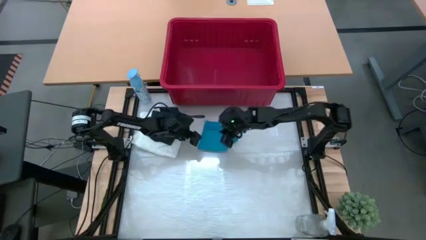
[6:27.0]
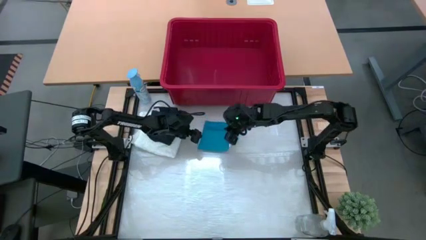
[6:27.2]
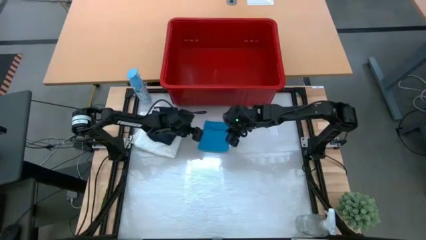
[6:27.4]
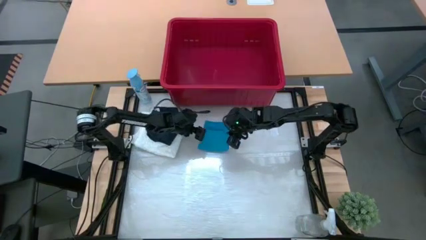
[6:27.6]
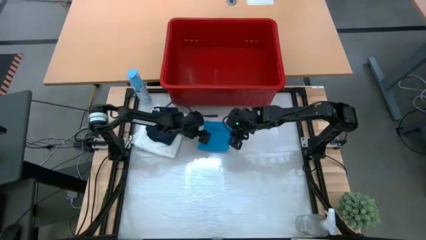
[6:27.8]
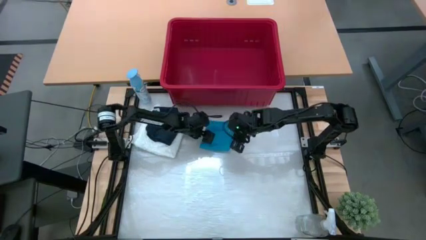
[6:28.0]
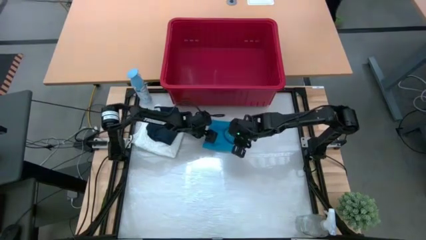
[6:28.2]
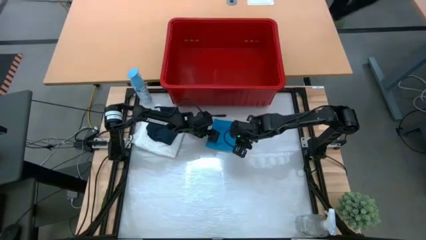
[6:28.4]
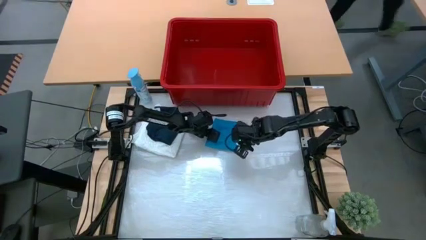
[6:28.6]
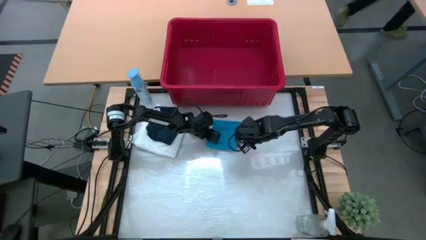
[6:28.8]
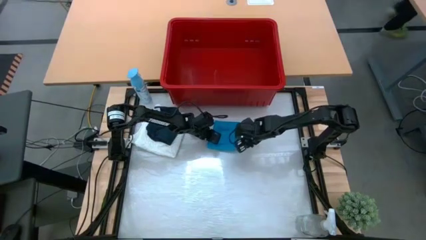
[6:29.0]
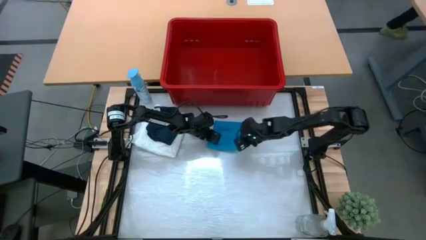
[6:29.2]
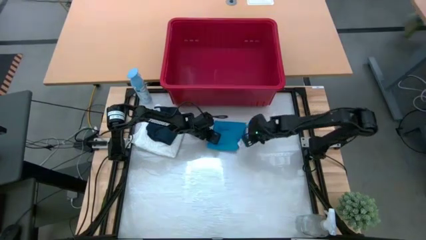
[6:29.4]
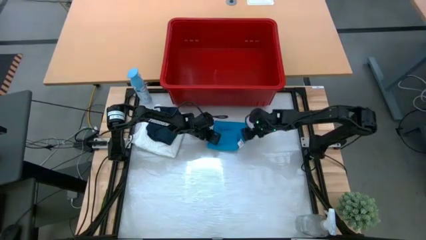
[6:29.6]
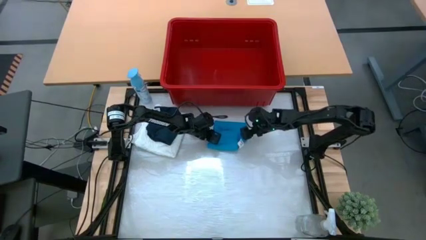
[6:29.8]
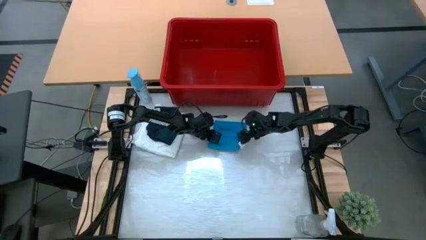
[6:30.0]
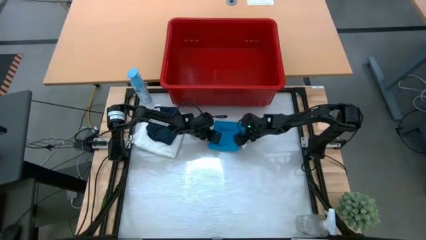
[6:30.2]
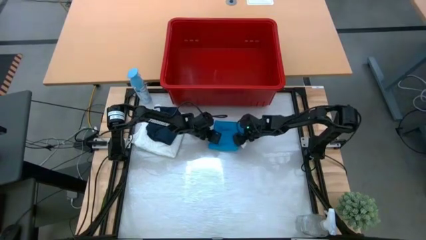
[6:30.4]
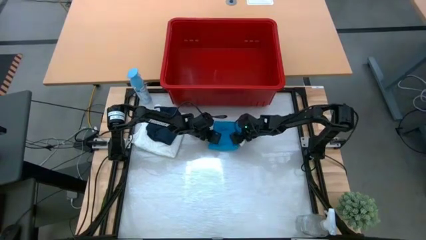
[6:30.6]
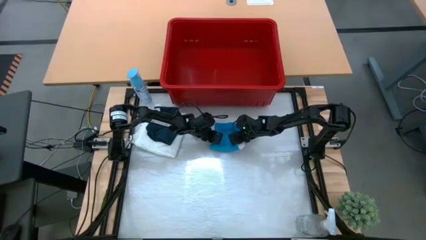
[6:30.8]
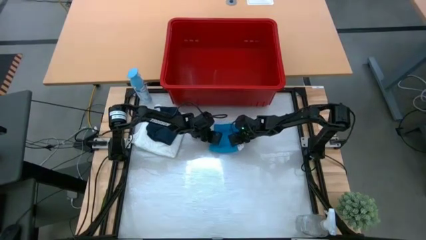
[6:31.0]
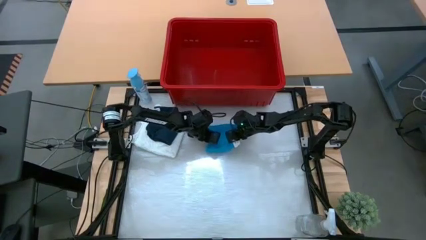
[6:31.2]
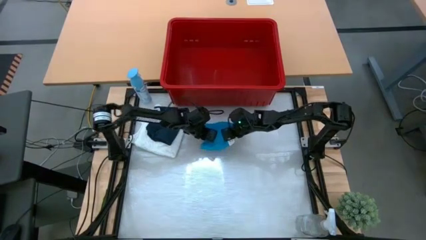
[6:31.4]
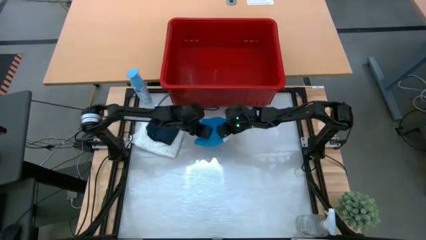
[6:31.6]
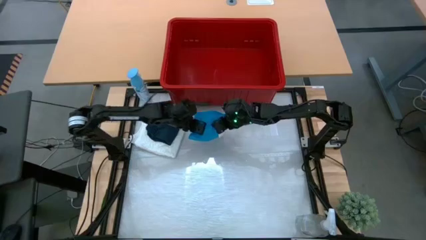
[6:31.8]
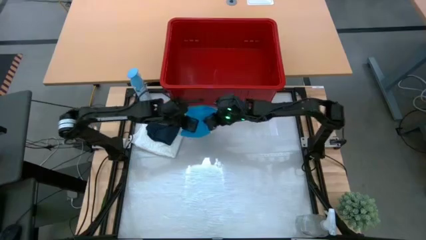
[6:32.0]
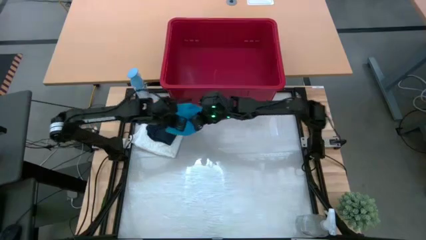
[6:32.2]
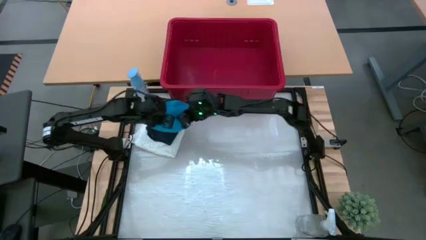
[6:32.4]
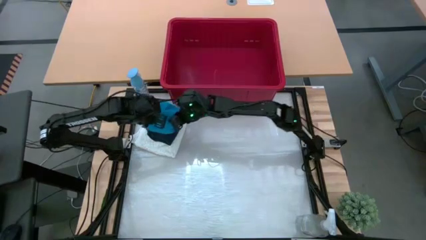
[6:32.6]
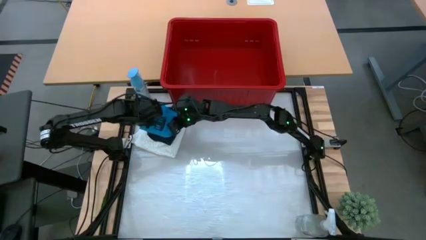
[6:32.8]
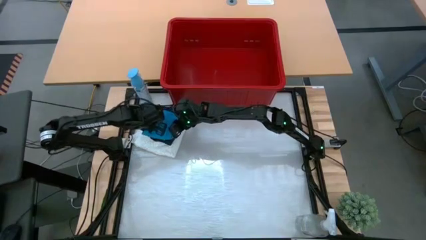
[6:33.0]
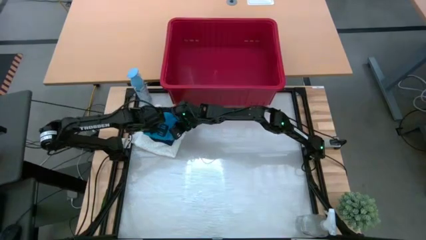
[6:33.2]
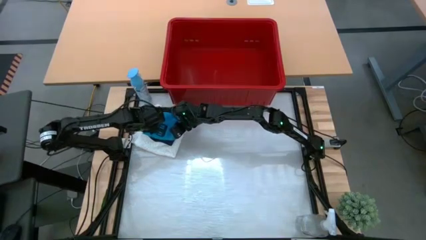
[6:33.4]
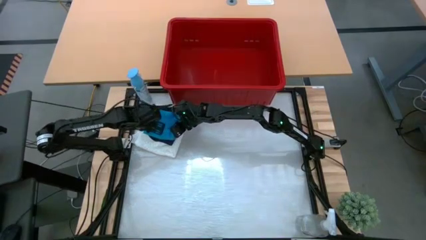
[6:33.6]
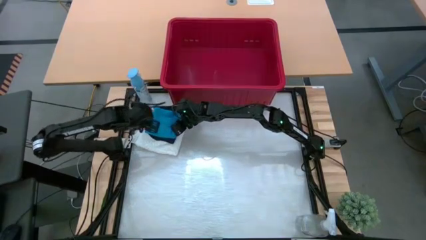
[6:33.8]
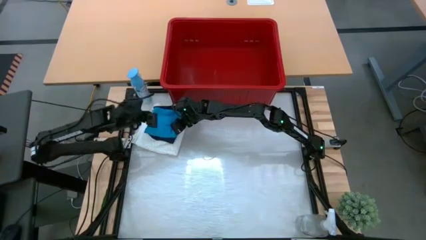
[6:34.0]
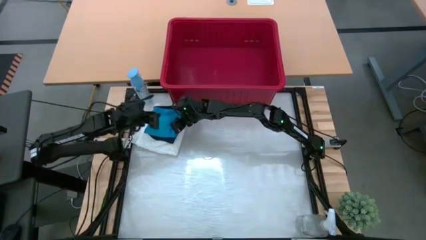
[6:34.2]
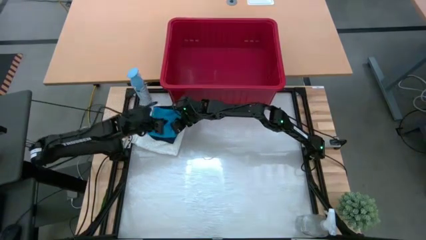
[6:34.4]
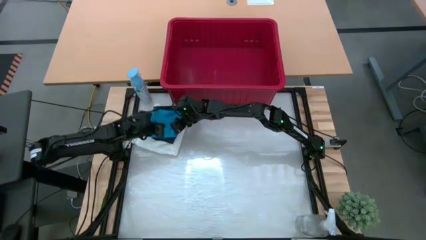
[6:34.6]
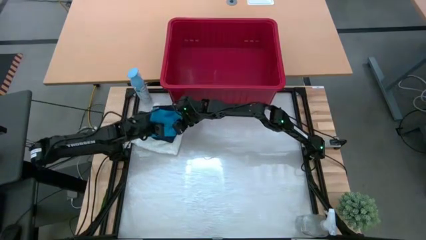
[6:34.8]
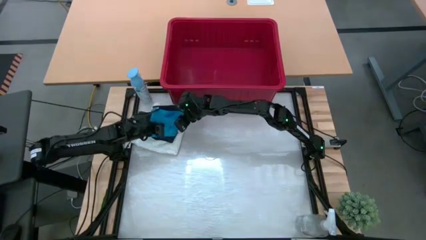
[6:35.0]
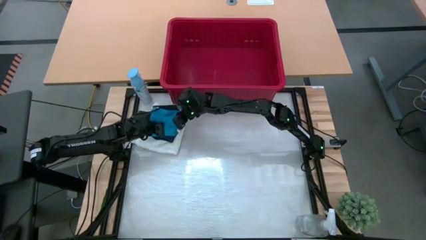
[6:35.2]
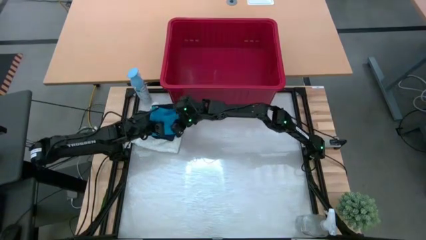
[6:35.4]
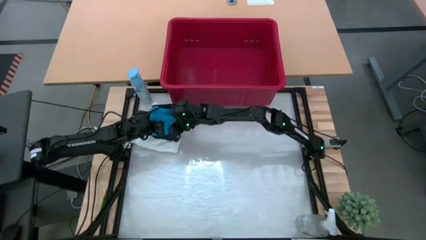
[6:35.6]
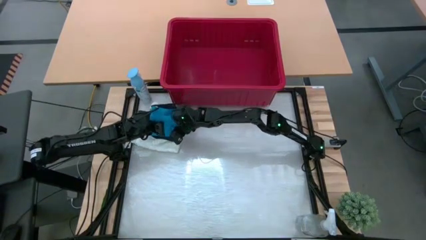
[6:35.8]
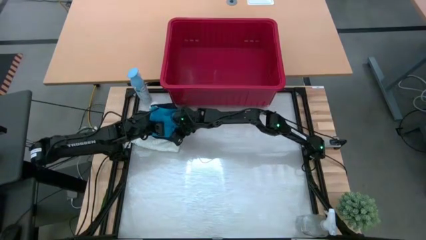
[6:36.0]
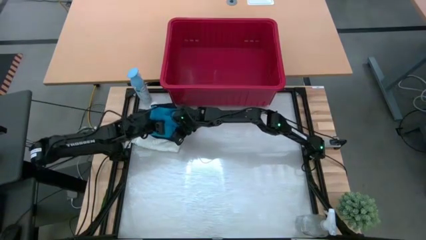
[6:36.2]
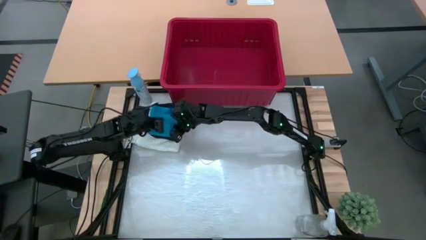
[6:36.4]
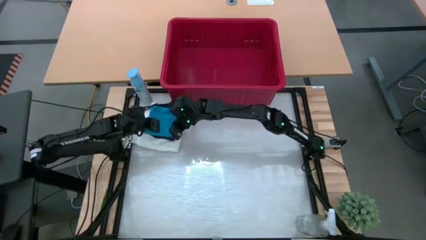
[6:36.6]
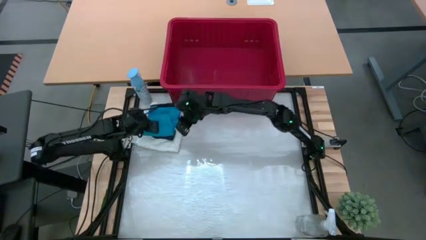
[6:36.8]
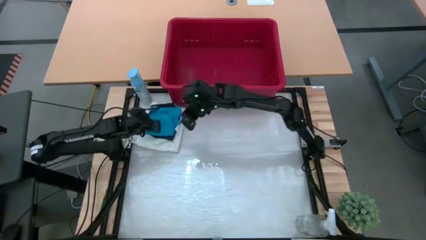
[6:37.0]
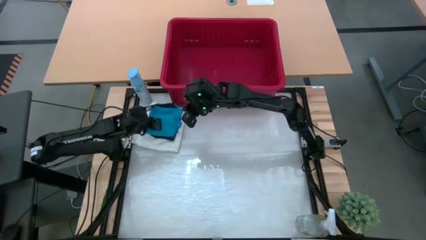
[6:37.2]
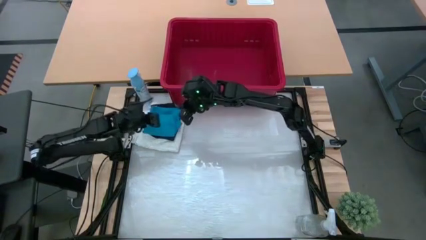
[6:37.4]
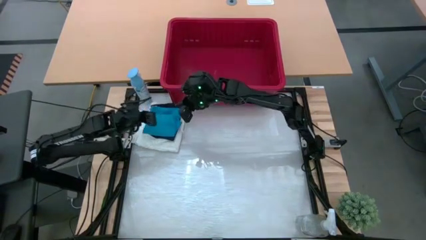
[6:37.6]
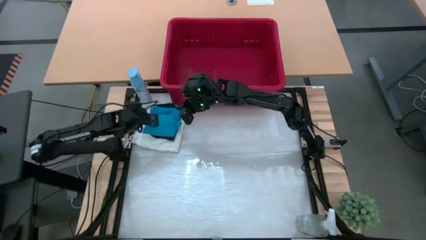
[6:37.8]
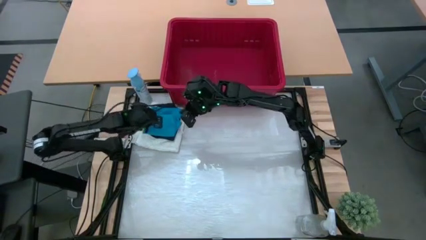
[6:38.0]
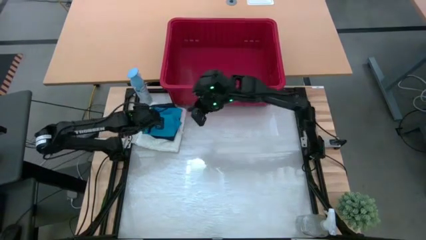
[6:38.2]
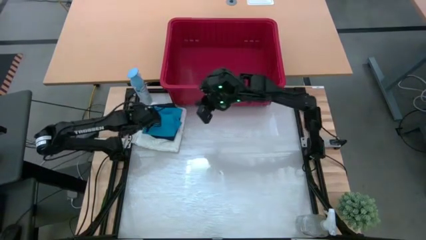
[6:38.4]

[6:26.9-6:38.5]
Task: Fold Laundry from Bin
Stack the blue shorts on the black shorts
